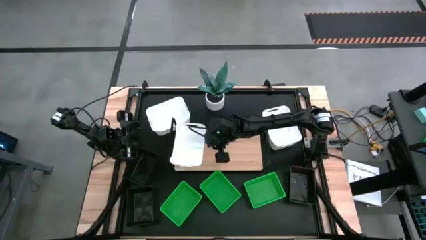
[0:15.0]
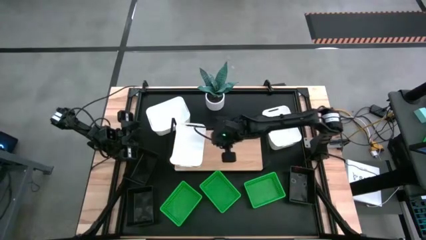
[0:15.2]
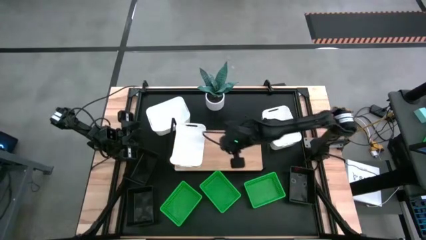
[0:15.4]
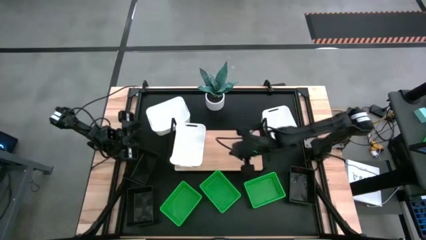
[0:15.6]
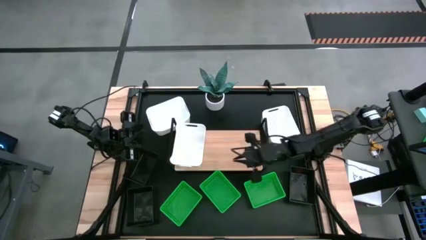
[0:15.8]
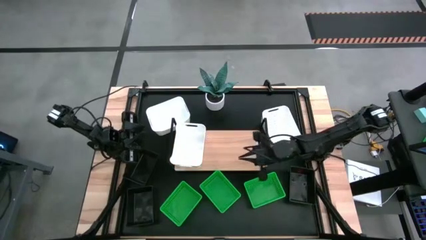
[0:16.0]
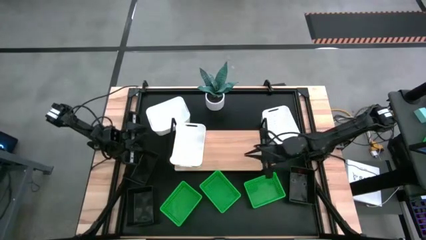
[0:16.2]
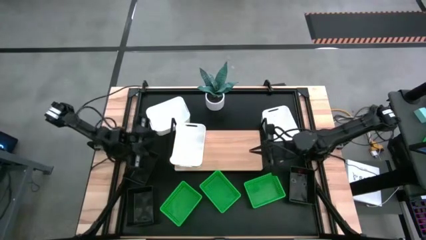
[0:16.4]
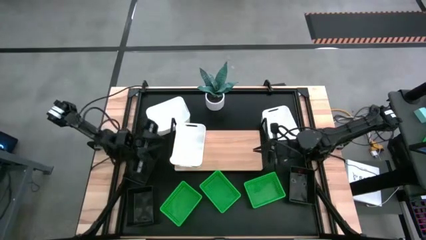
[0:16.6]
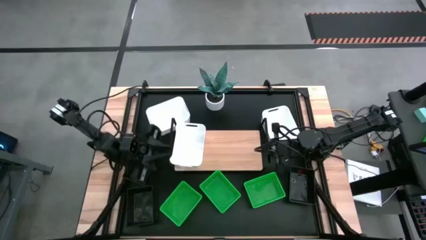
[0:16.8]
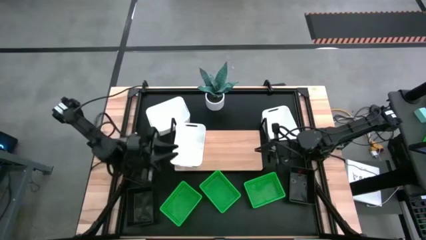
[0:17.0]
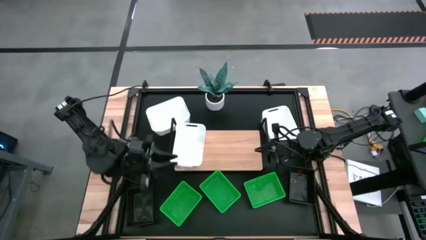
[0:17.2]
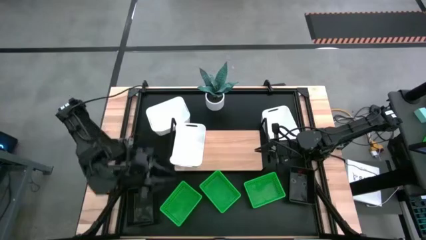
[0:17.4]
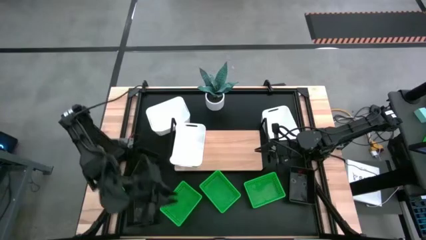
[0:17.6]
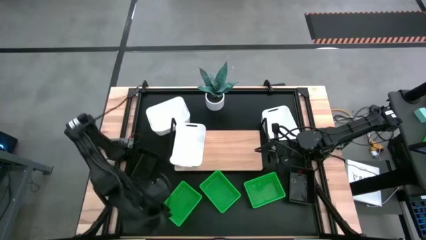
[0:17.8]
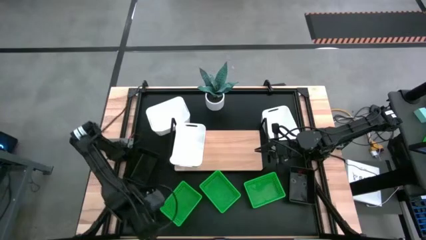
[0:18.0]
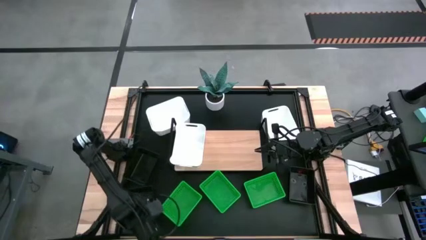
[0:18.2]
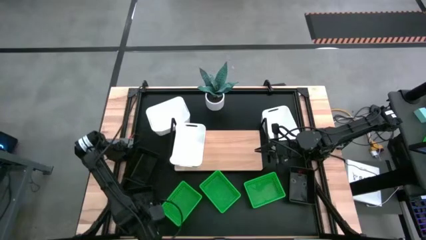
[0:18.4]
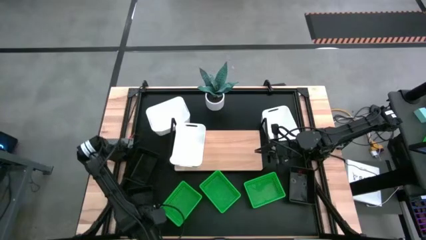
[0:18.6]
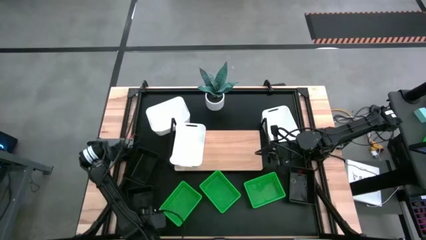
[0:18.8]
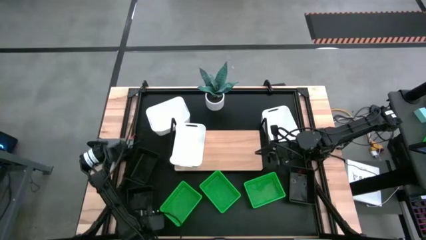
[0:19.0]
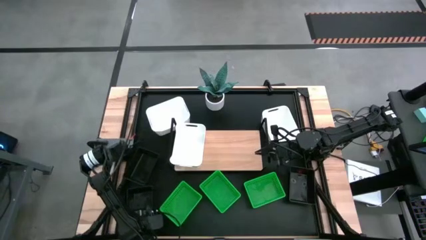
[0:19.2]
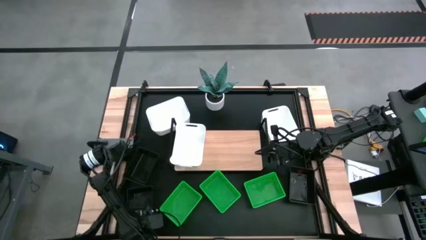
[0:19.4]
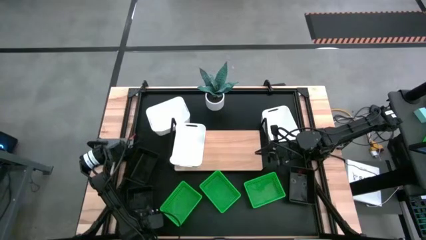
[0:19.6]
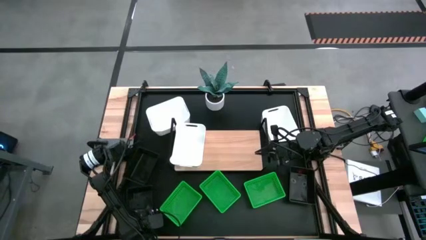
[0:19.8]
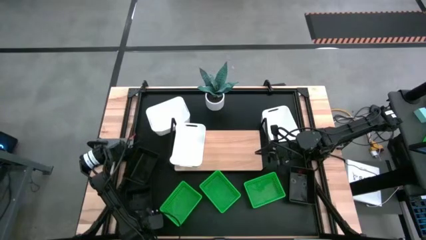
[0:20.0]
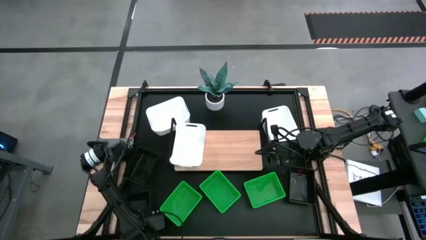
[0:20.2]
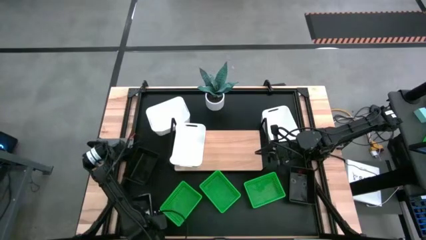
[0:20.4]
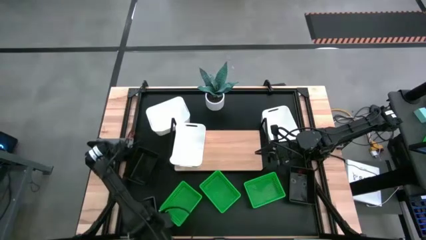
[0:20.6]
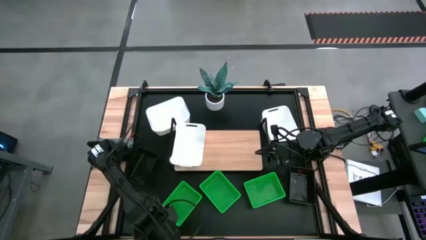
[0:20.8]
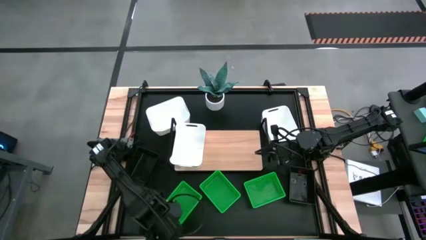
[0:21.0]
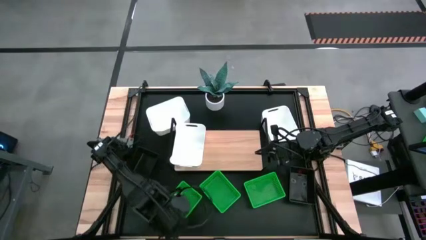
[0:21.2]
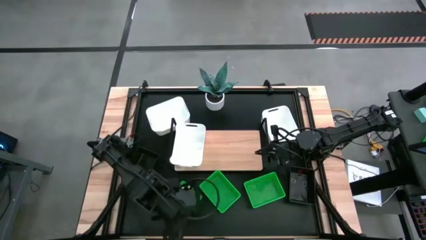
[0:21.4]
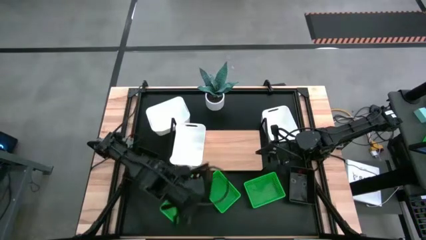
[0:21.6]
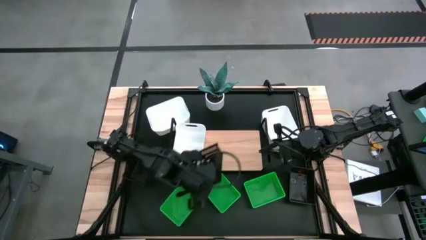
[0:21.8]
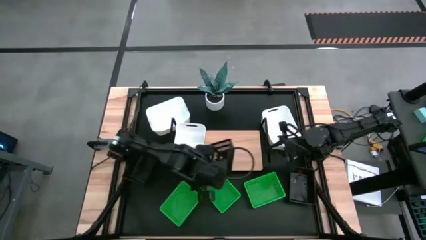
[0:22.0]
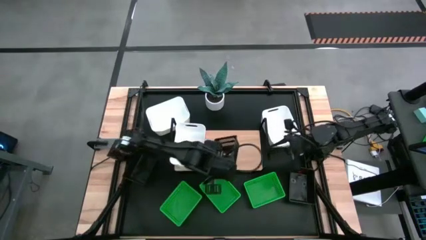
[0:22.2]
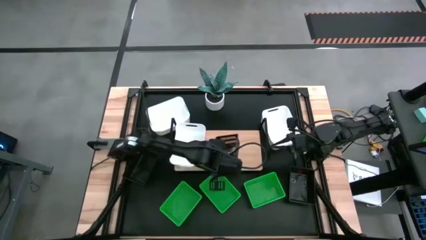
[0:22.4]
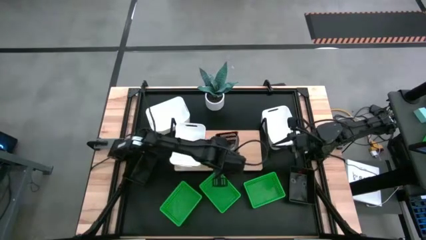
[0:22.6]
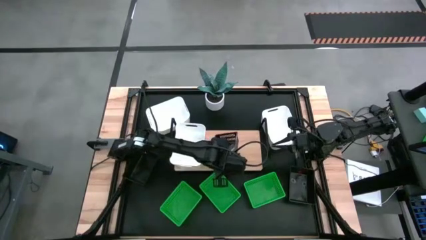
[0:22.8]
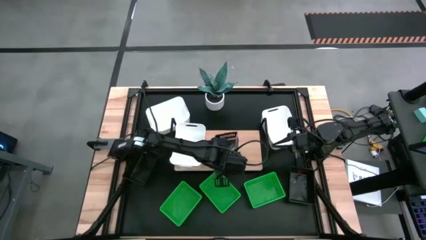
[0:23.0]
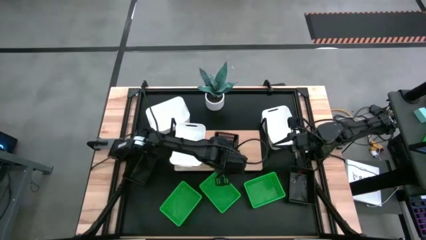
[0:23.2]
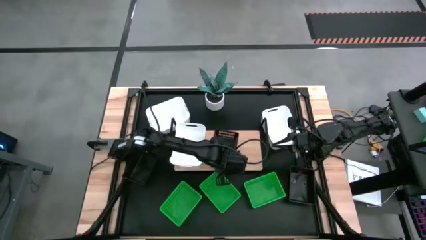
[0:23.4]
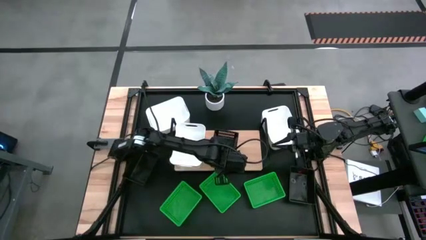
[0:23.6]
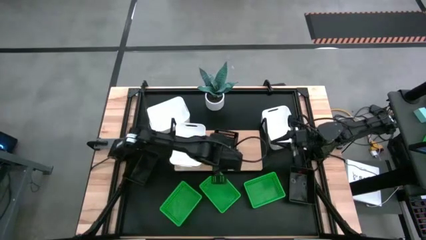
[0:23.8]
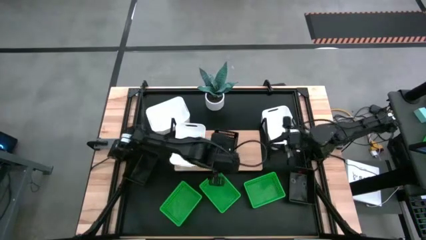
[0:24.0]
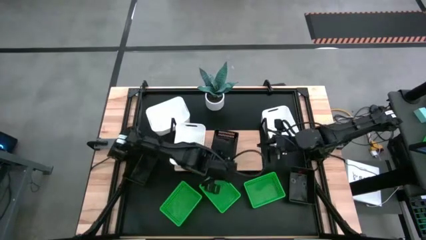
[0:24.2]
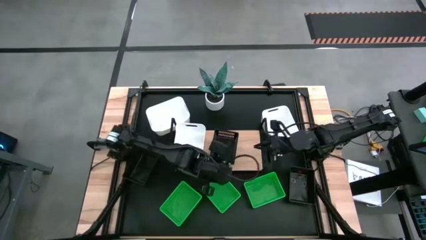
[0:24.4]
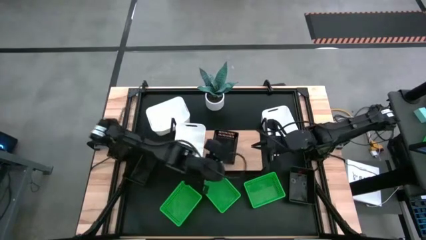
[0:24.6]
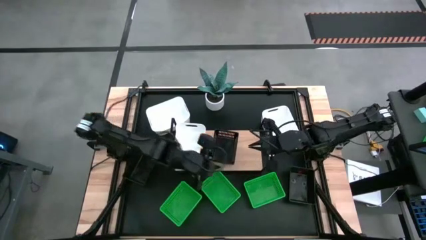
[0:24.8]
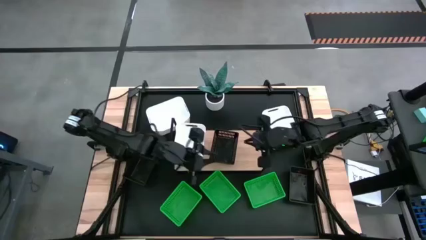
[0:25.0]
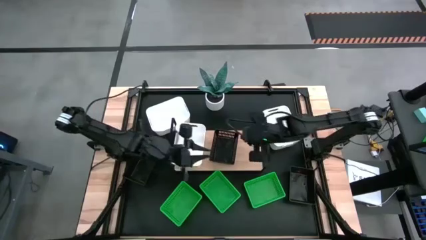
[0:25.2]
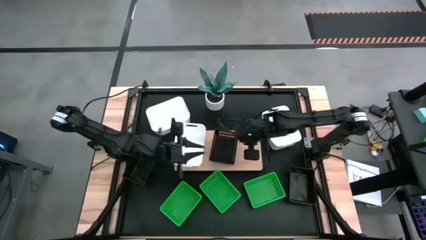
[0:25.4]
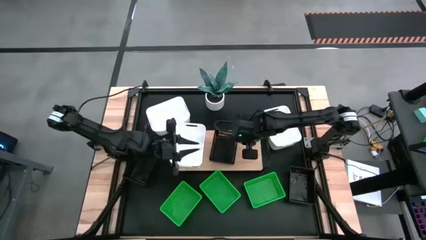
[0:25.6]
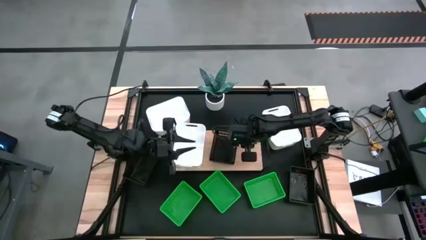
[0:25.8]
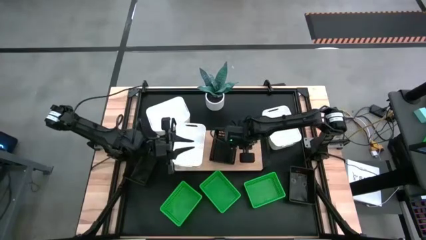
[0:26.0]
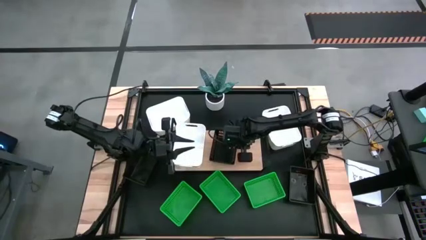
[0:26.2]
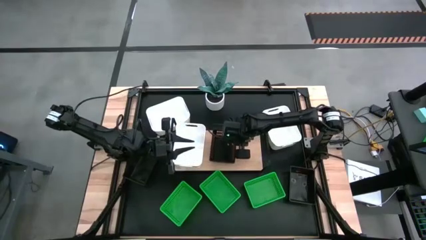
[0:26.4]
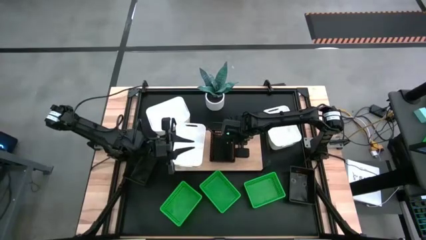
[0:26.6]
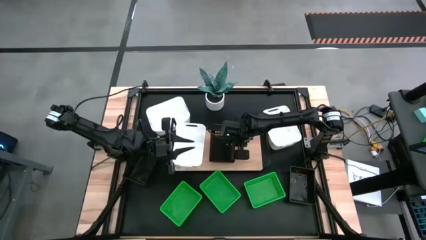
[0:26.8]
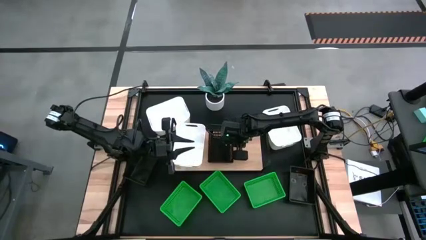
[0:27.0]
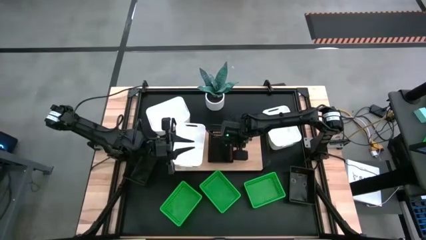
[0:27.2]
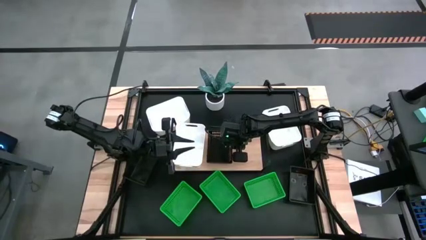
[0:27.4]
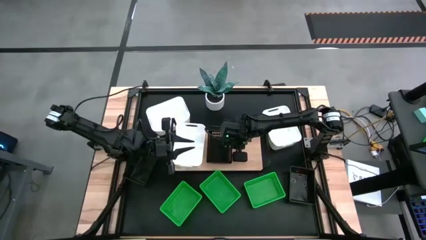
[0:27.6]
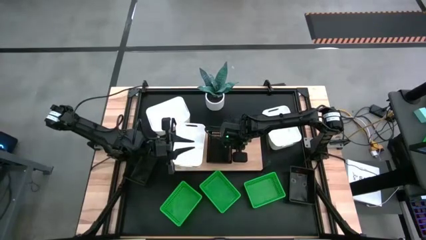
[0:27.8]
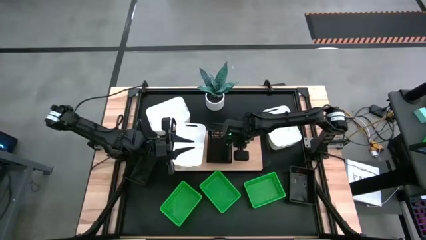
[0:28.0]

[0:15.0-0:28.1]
Task: Stack baskets on shelf by color
Put the bottom left black bin on the shelf

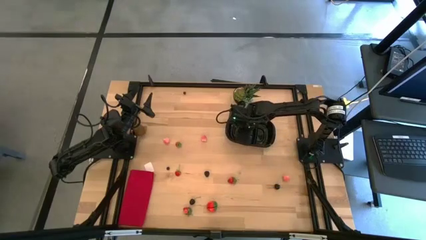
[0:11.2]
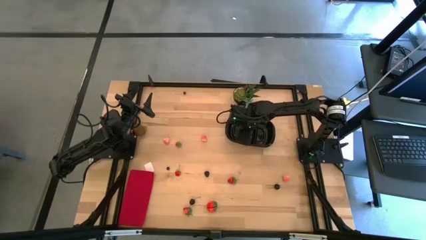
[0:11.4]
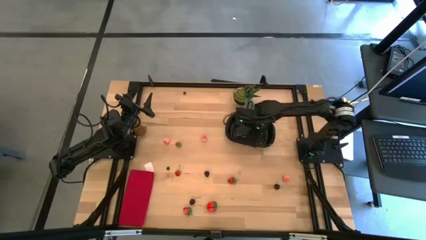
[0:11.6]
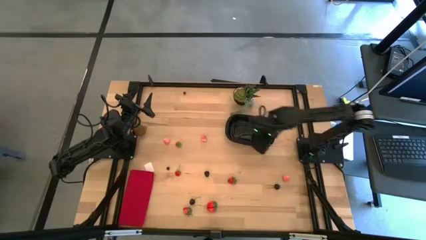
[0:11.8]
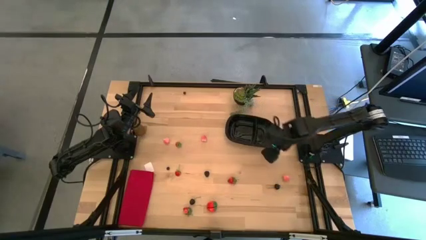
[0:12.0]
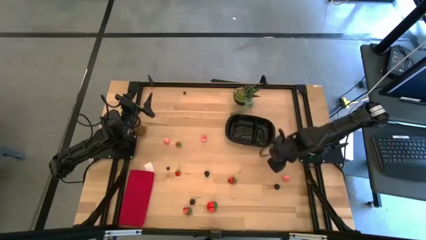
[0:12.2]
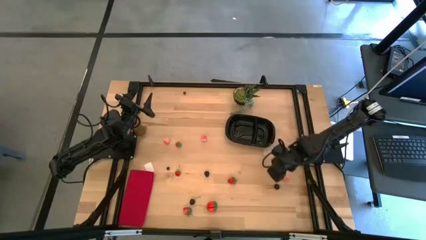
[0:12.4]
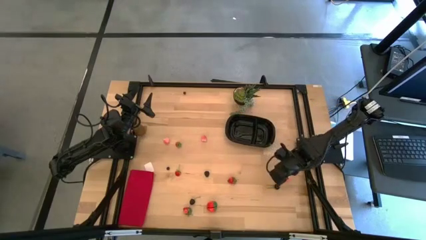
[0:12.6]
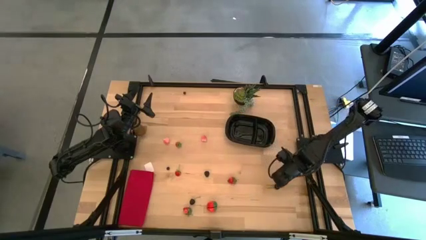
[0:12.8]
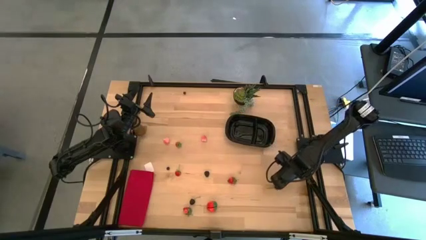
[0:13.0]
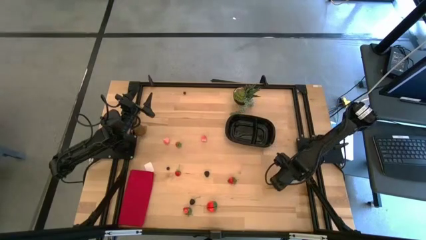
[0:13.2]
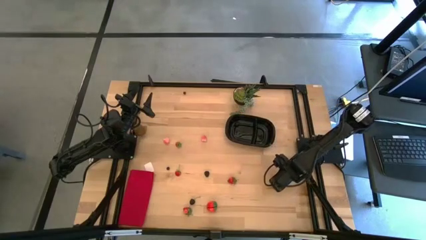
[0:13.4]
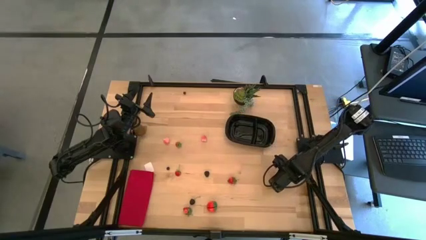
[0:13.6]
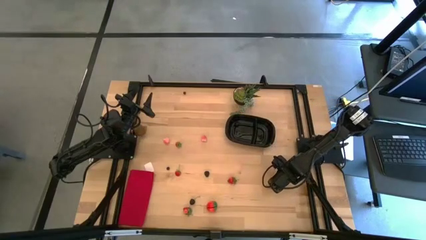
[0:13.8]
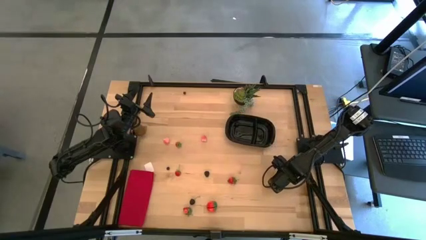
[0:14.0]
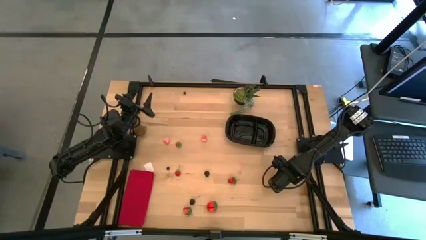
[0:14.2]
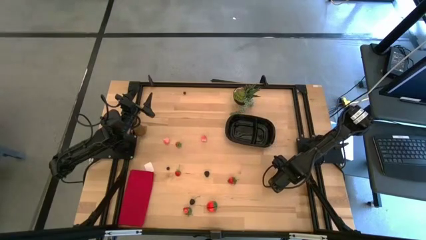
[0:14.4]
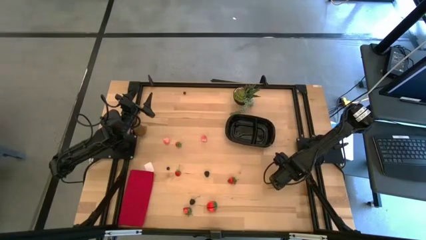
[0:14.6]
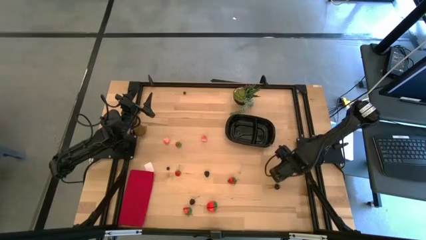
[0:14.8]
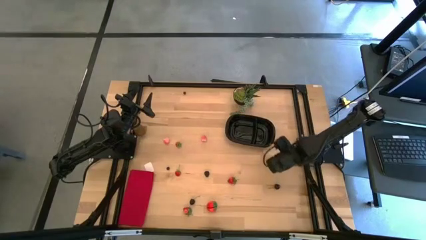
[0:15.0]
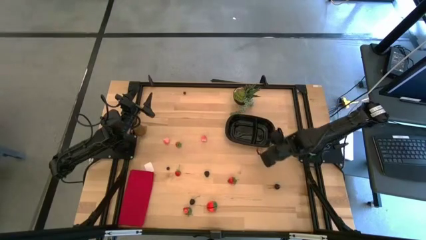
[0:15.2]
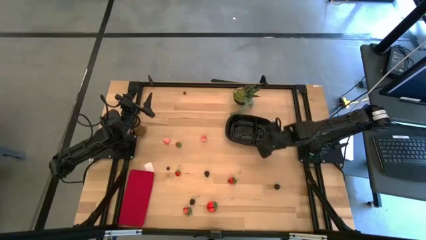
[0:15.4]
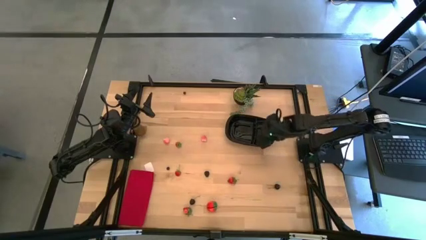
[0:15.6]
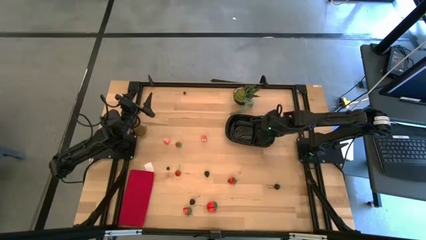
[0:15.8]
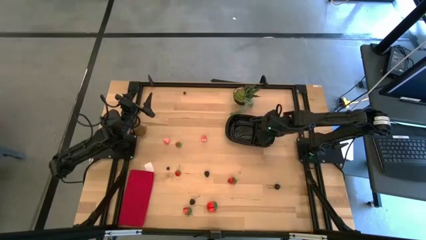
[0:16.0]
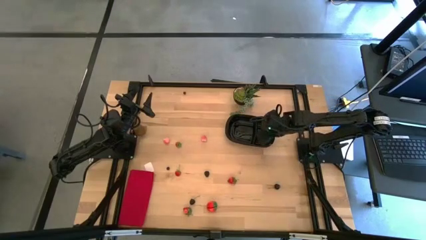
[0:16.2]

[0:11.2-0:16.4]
Task: Pick and placing Produce into tupperware
Put the pink peach into the of the black bin
